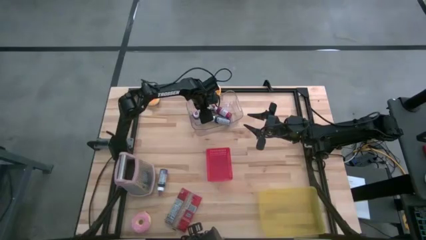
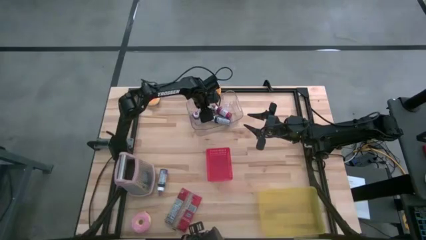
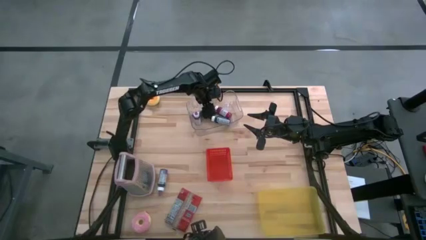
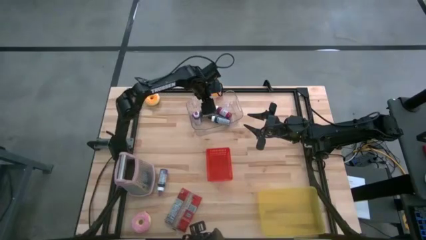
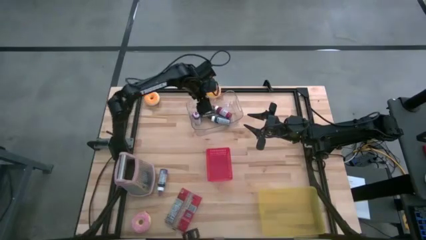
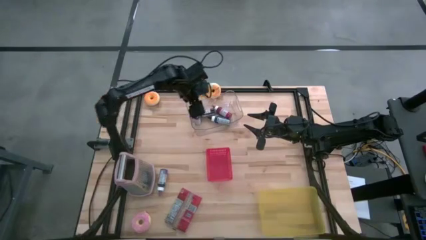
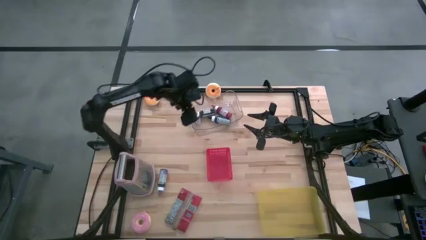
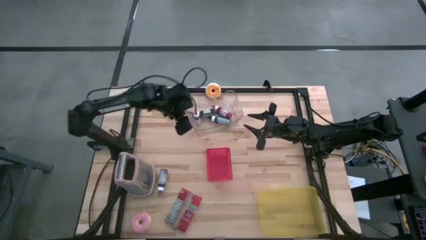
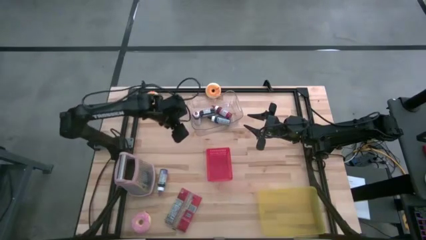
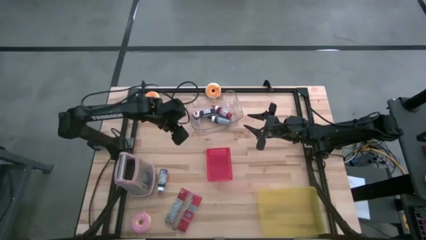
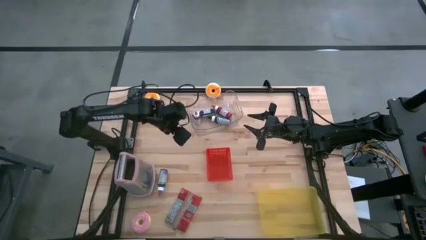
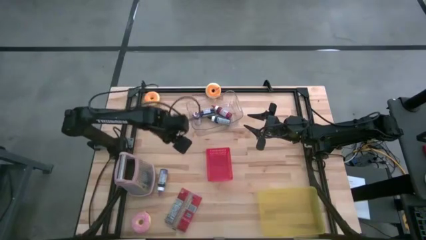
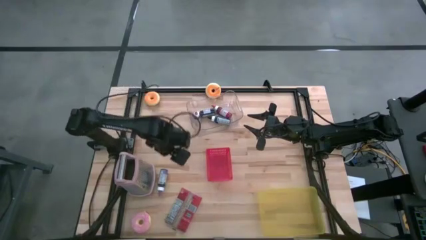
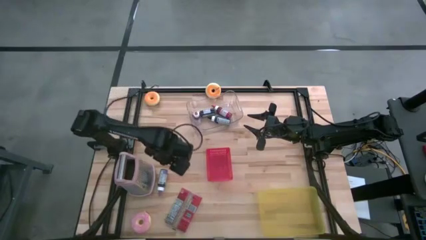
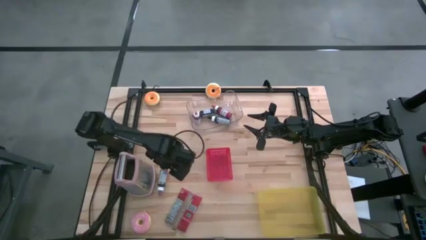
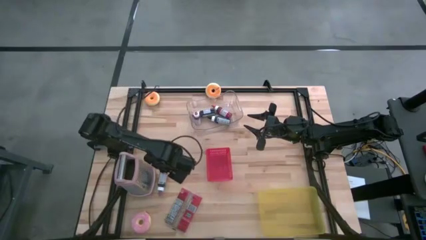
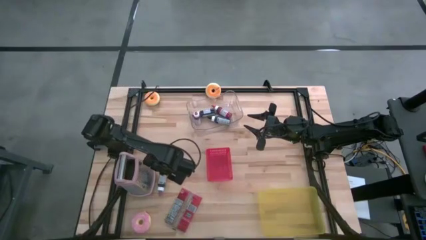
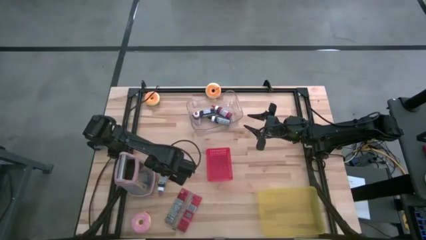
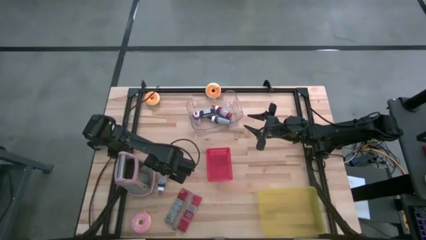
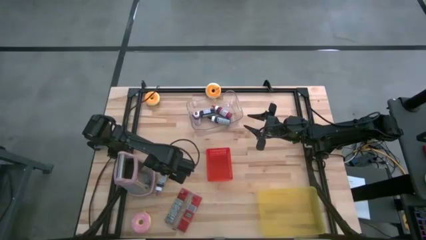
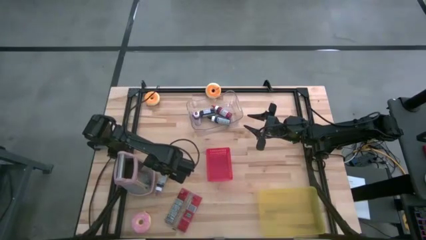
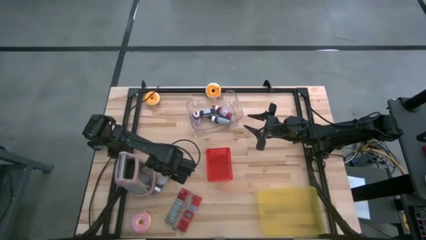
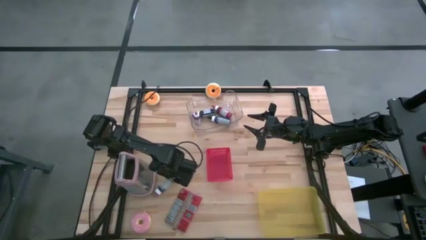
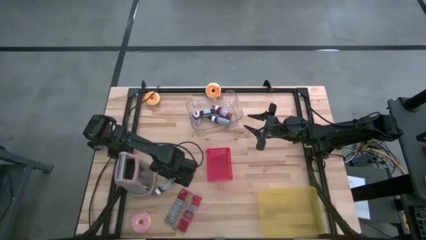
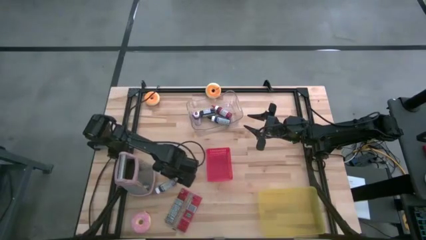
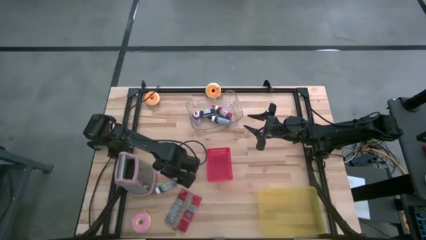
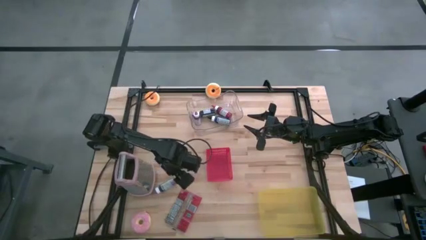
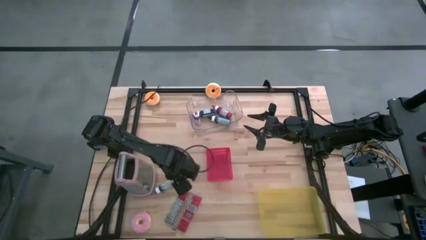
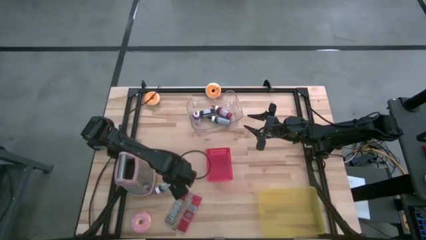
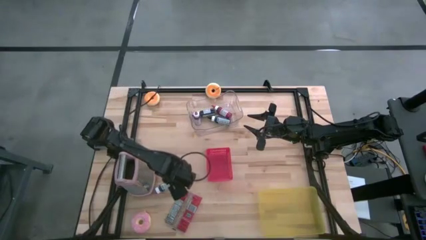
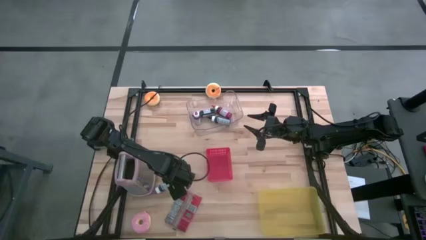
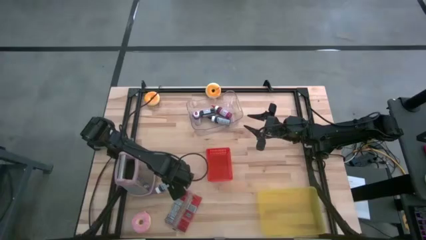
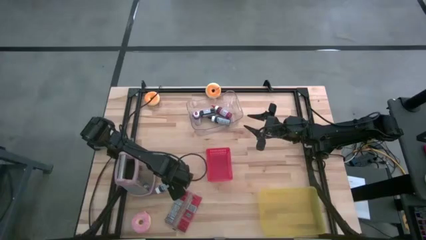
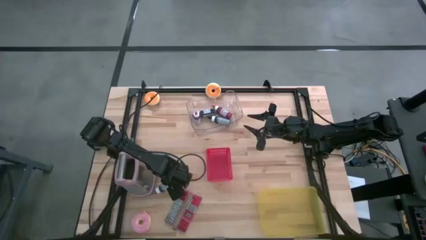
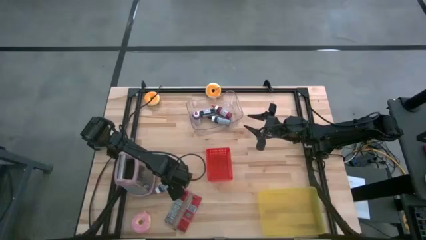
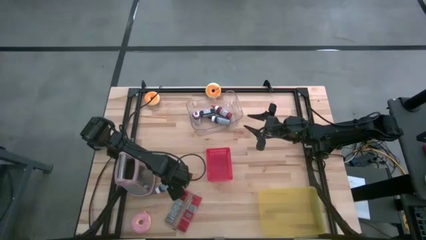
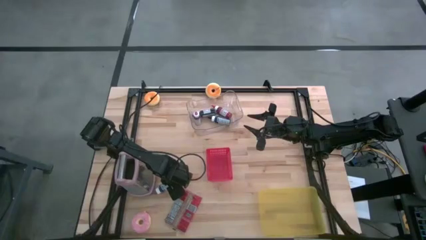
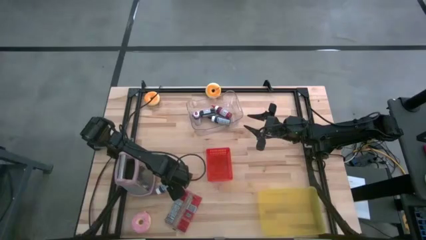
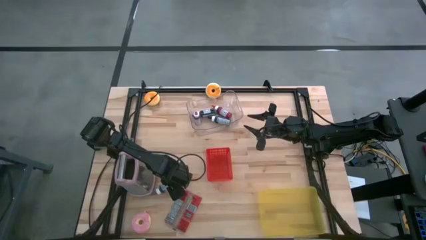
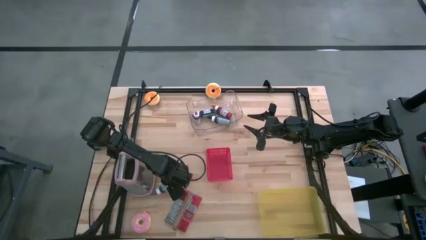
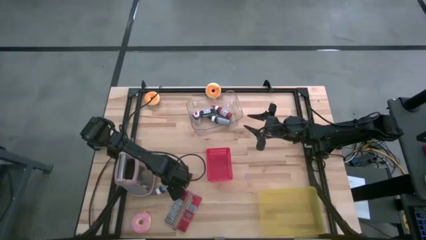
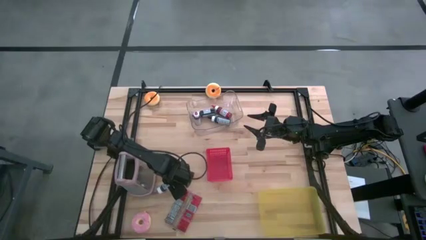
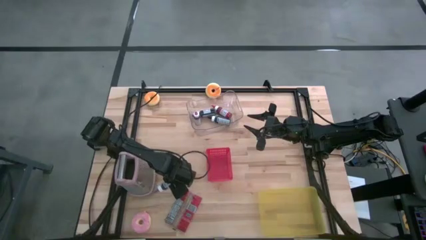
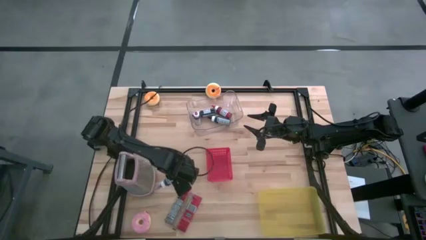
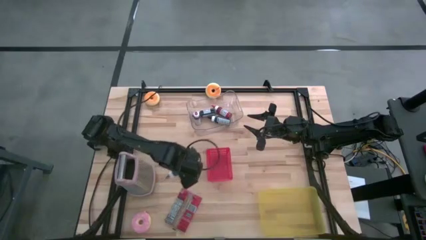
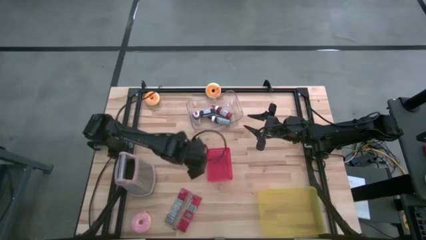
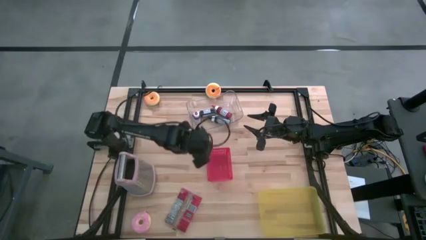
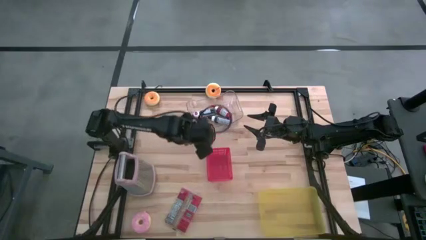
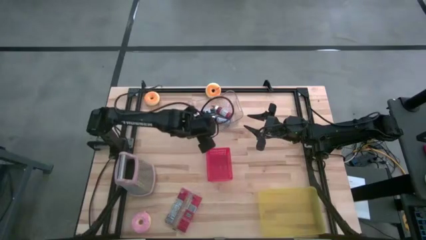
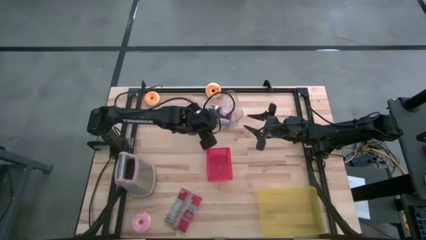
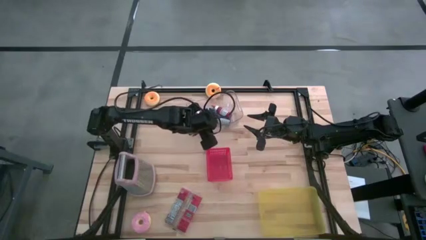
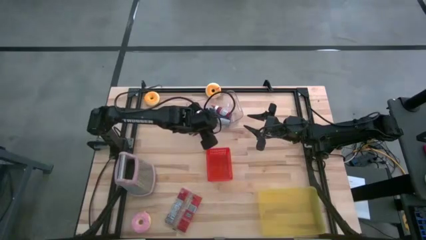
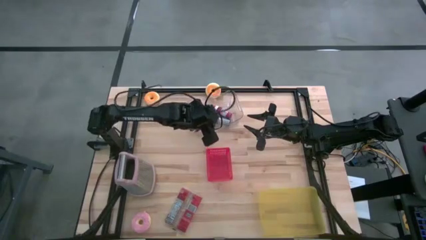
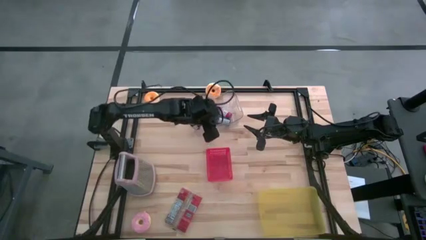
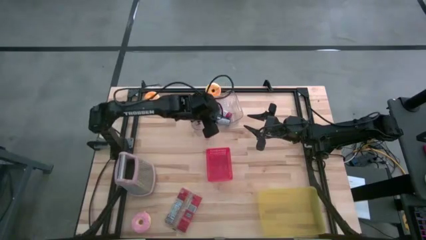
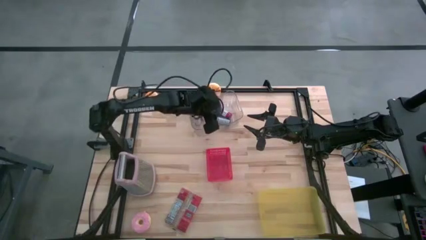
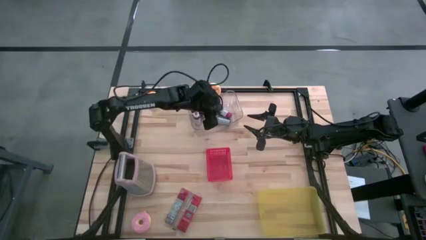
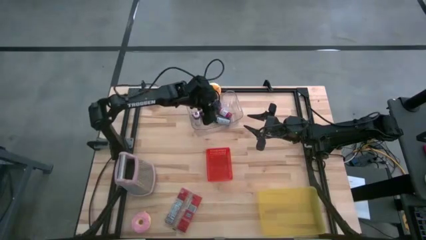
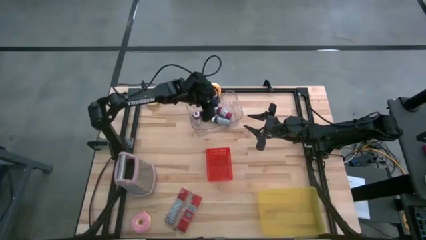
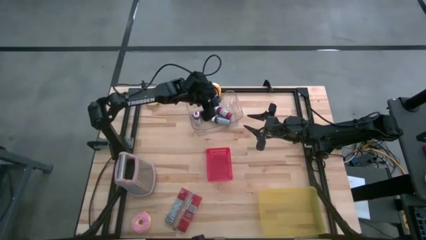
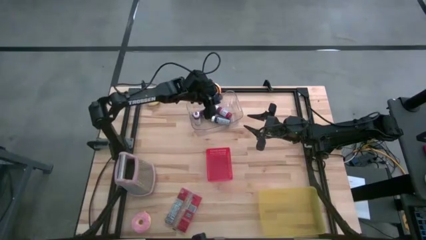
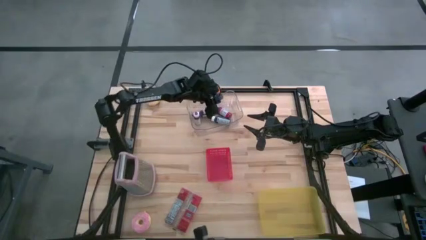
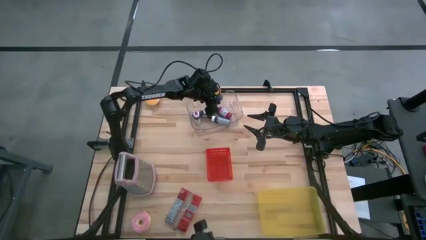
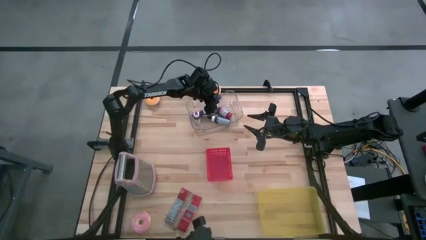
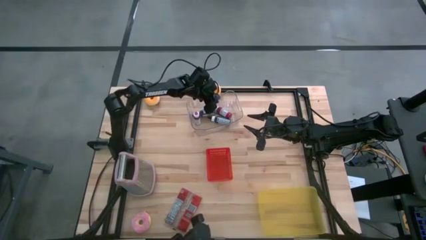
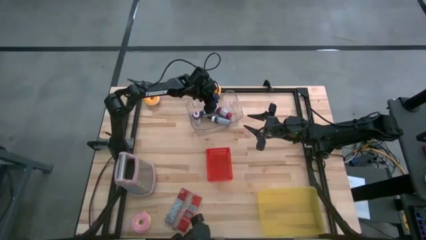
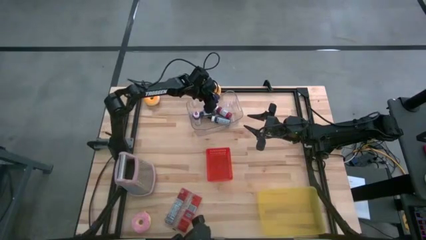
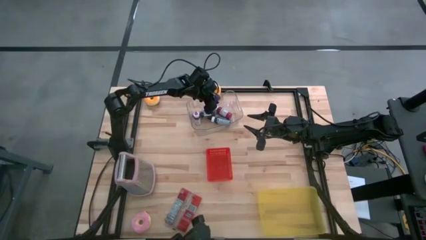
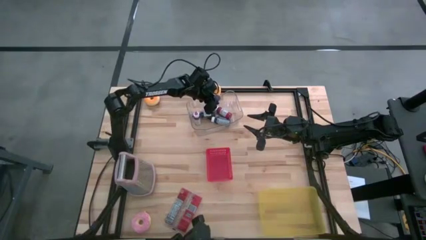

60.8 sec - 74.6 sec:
Task: Pick & Place Food Item
Put the violet food coloring bottle into the transparent bin

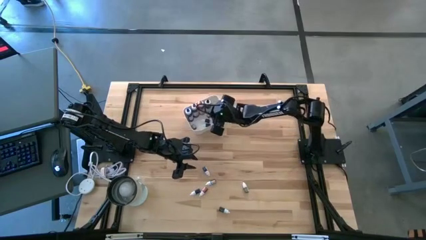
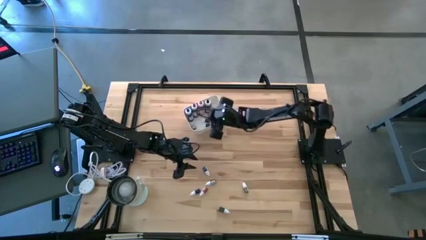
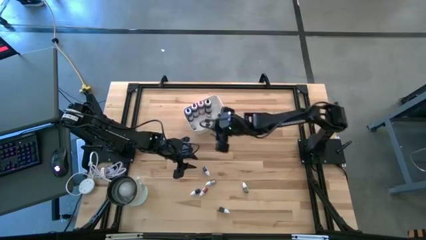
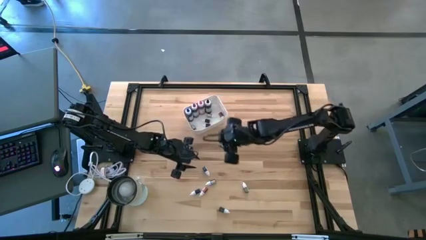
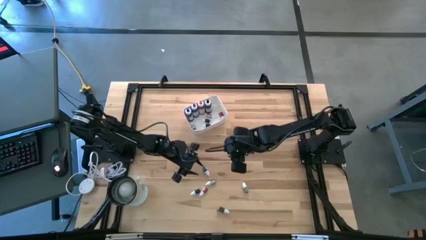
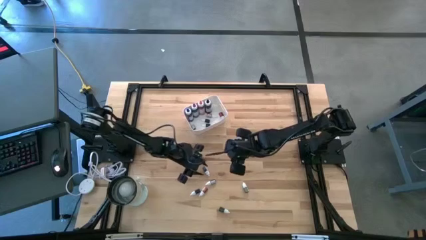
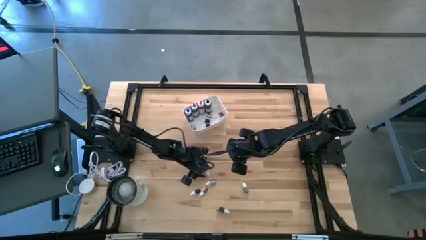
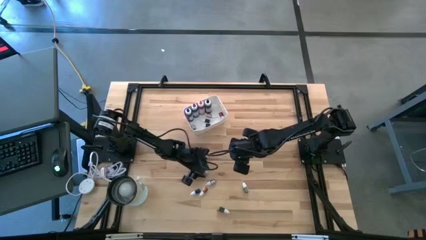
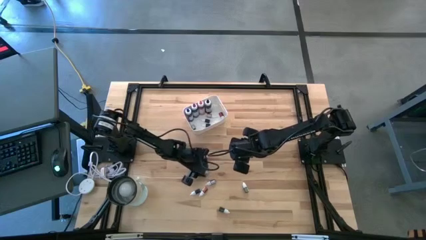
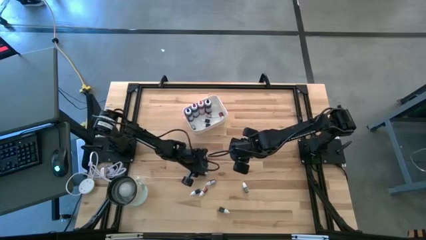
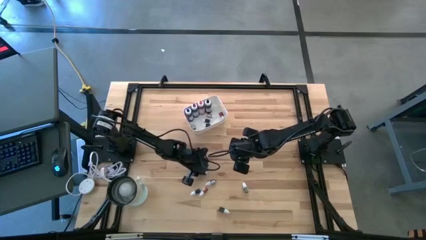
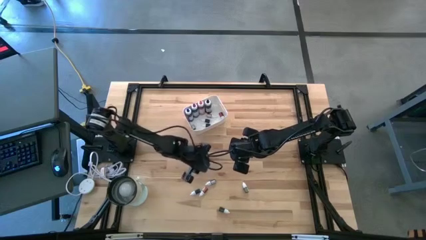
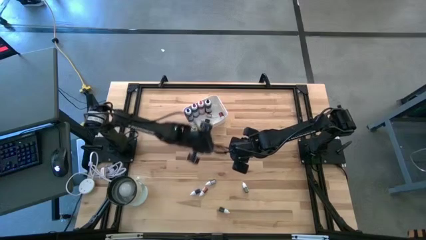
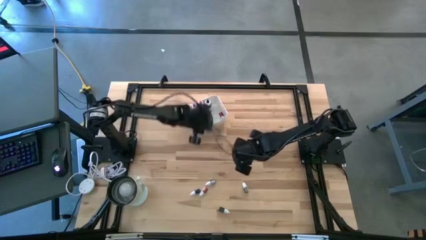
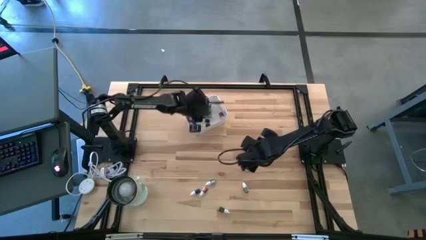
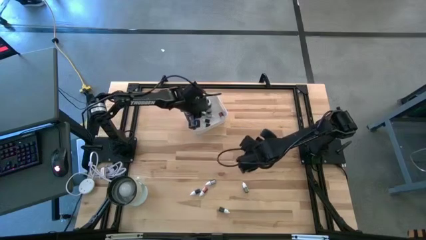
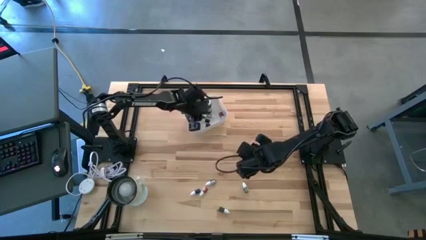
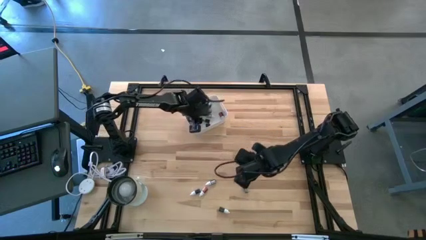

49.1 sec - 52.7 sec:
Task: Pick & Place food coloring
Put the small blue food coloring bottle into the white bin

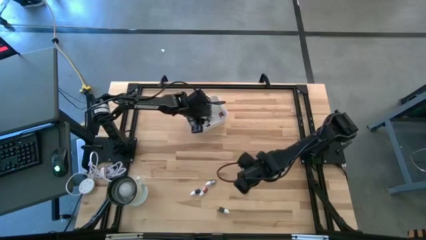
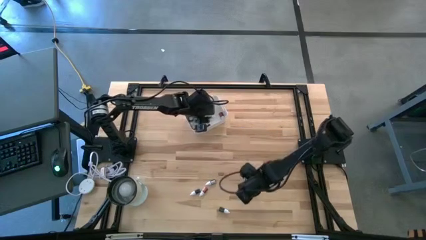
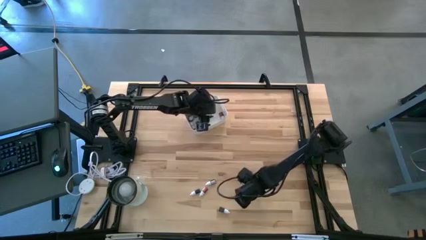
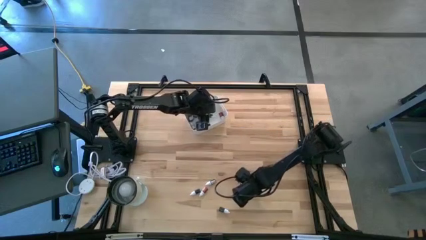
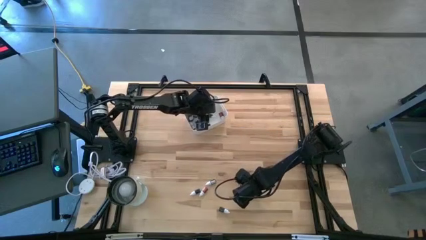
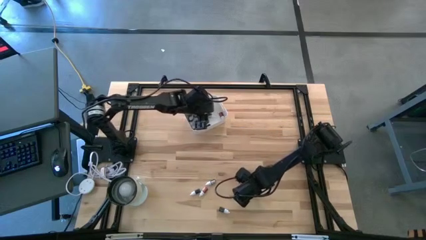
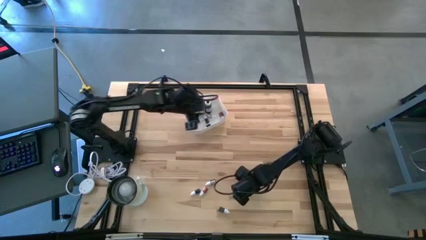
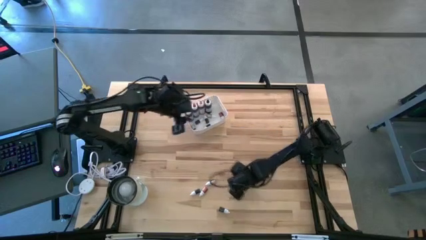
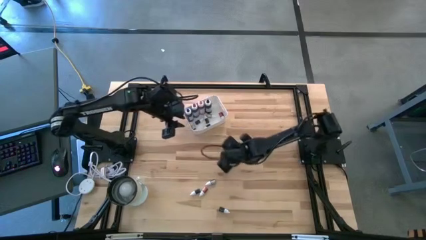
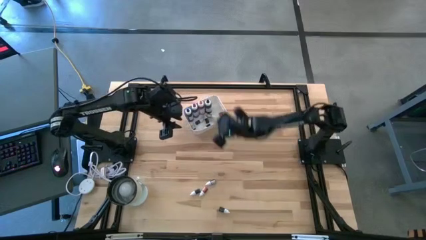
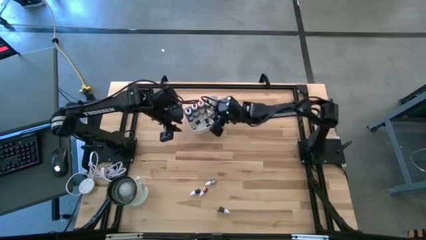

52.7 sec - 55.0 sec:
Put the small green food coloring bottle into the white bin
